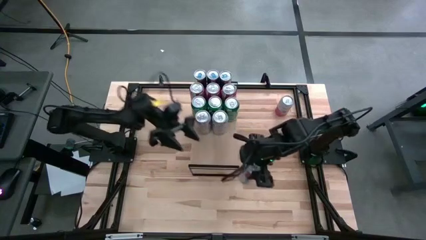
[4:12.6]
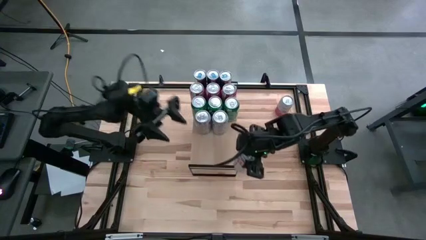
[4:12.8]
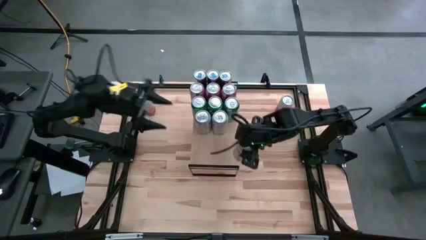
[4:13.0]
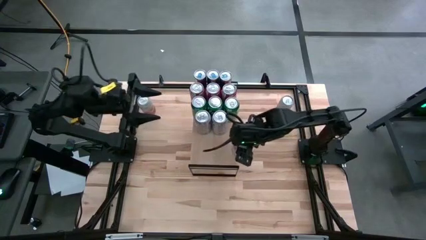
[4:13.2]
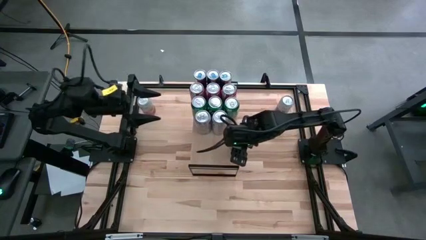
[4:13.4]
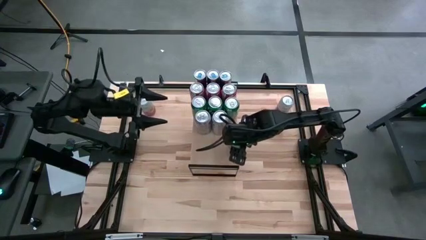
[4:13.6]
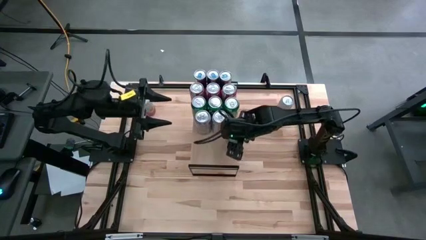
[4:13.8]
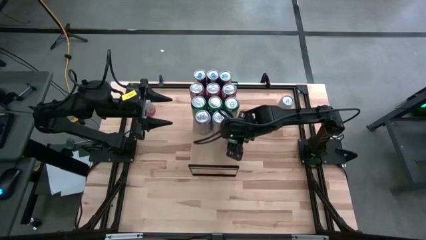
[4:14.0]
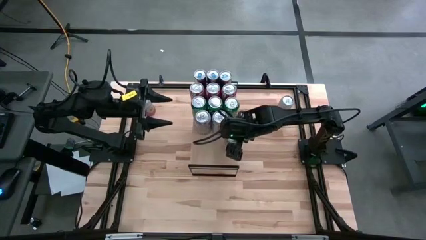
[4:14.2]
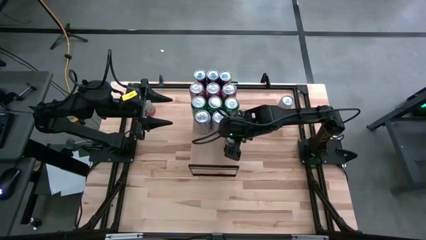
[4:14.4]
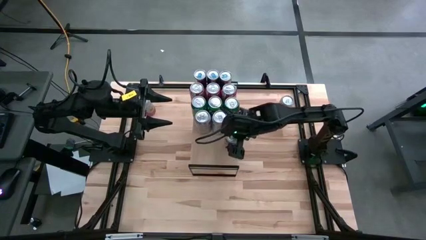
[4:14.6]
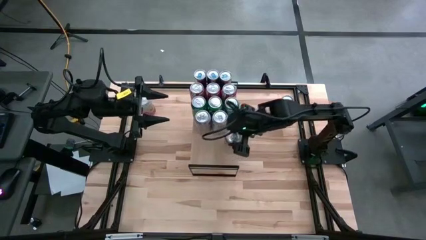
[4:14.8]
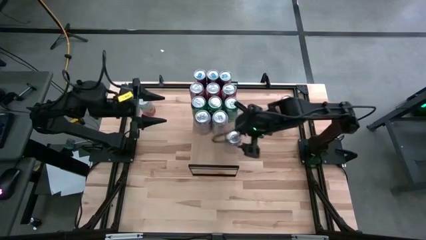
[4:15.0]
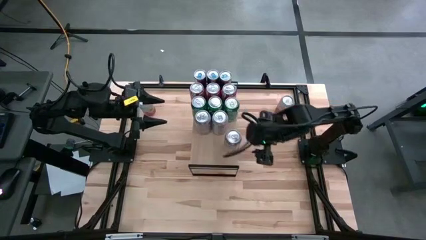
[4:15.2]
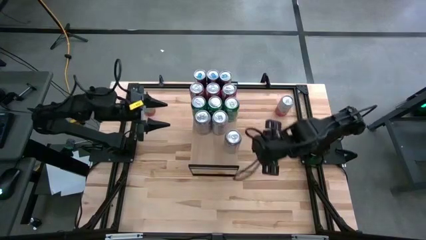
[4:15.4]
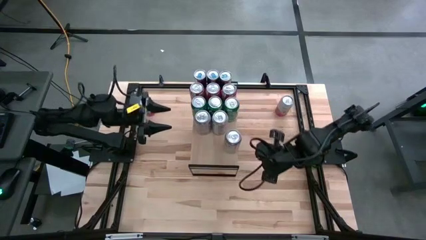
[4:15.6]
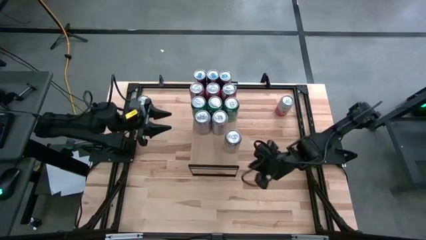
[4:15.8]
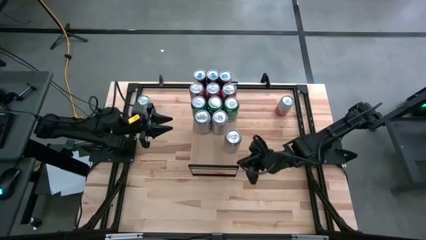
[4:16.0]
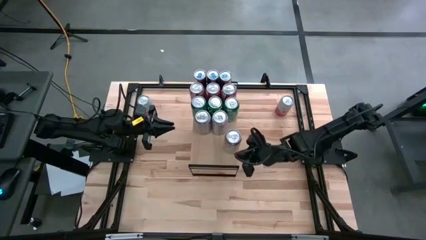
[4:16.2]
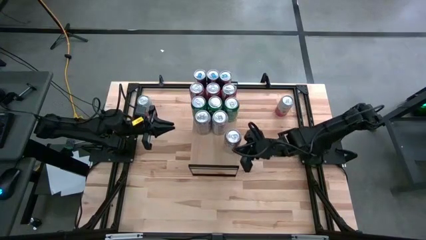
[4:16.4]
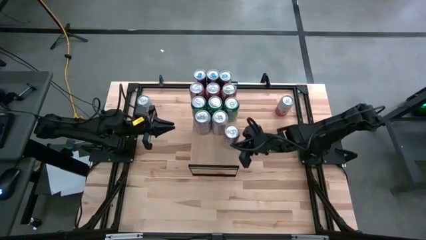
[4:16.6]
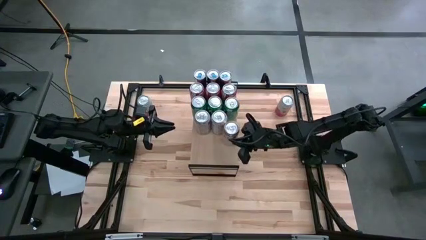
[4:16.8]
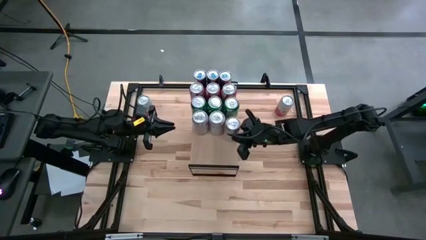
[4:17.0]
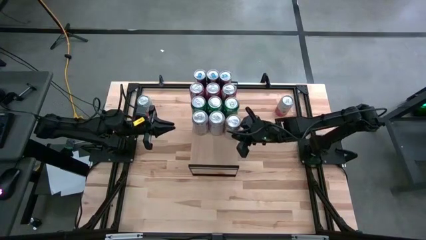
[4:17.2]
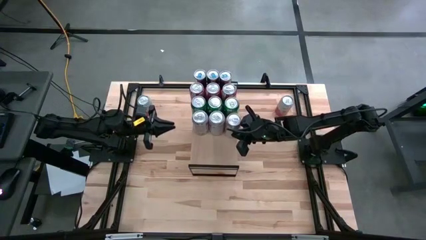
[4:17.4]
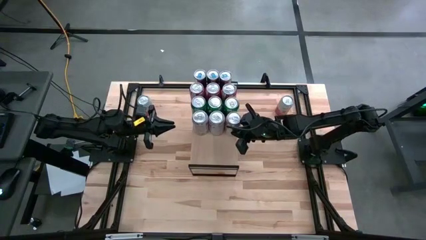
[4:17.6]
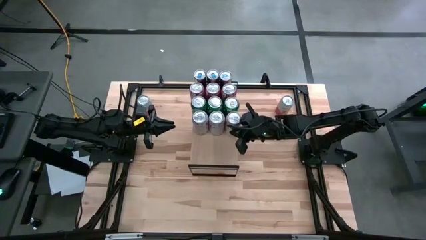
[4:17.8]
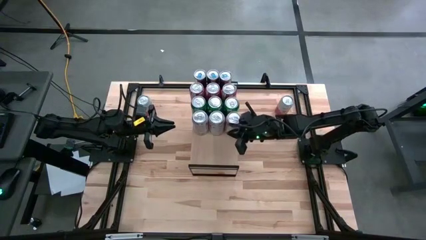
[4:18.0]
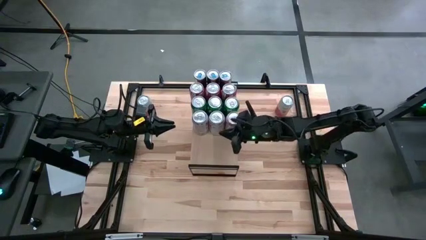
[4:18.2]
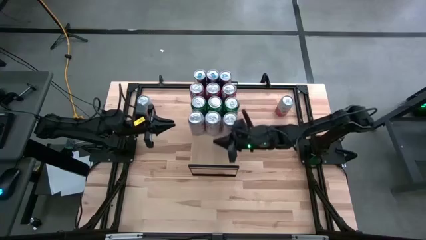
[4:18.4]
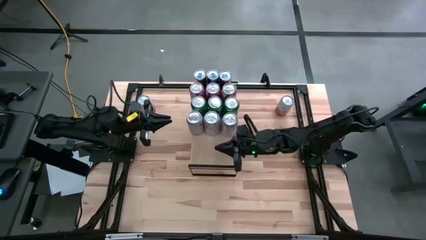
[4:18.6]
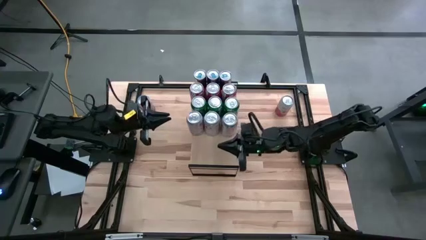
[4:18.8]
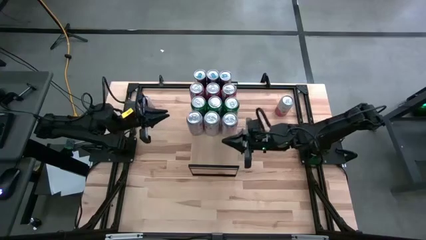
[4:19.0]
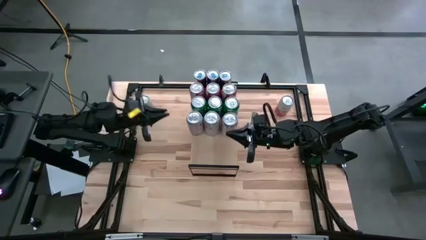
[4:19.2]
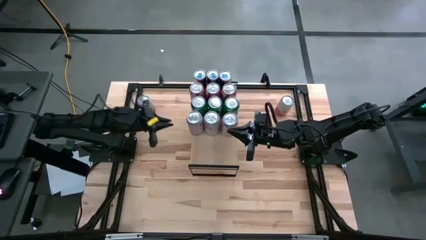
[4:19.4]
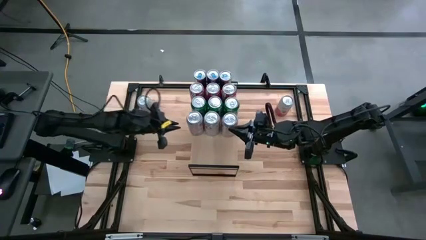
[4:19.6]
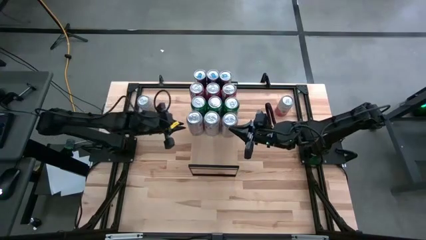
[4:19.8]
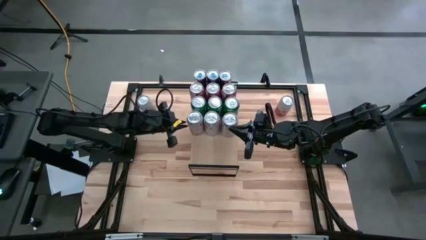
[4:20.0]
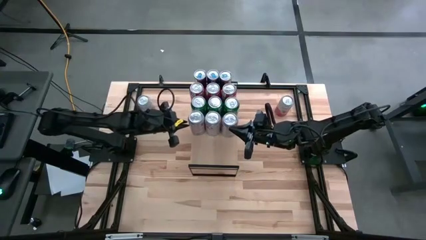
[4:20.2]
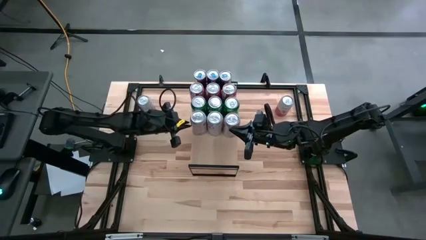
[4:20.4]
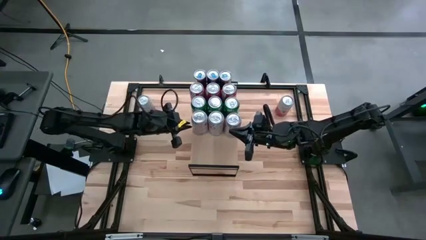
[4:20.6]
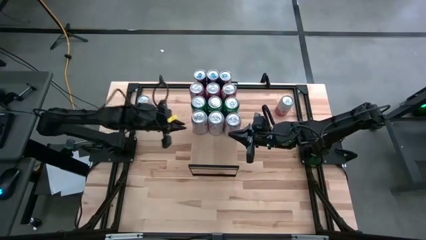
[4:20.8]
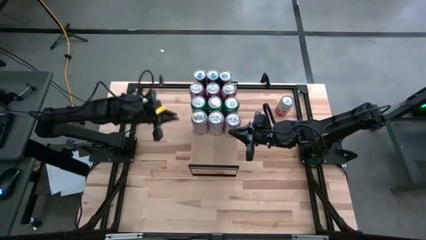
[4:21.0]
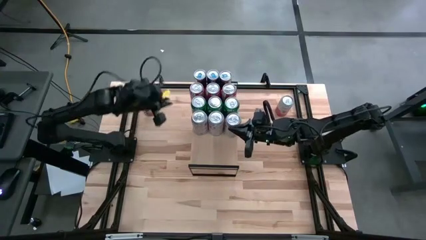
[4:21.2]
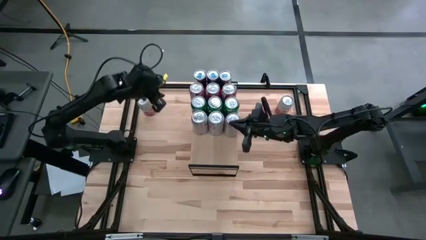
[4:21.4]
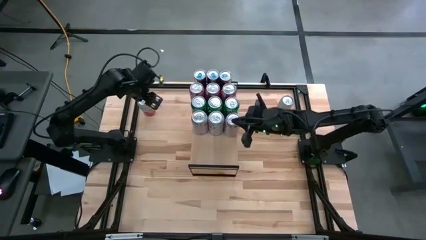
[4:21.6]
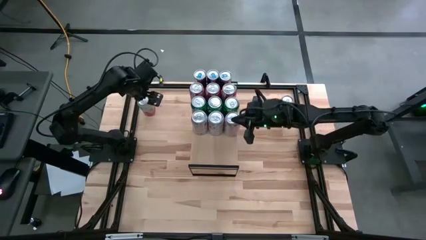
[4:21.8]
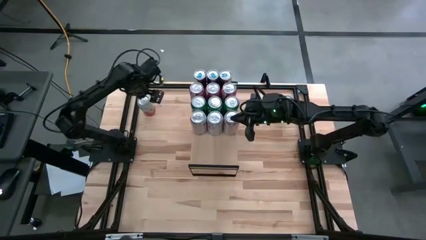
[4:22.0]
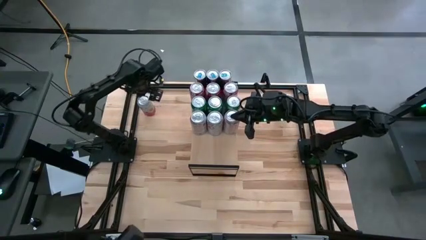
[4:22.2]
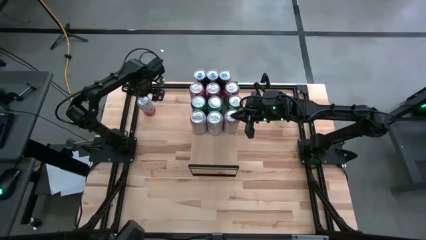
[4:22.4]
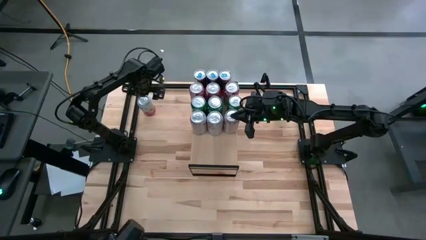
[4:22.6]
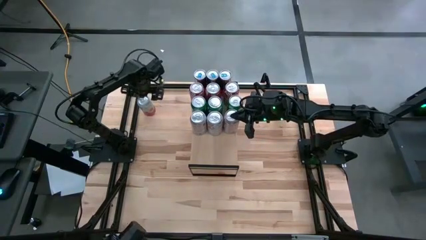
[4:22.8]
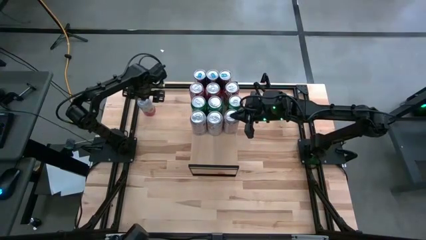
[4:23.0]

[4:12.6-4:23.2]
Task: Place canned beverage on shelf
Put the red silver soda can on the shelf

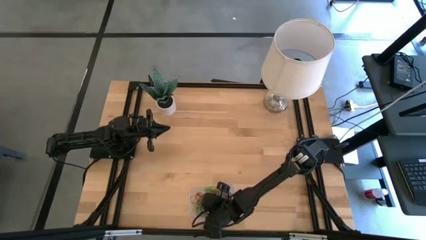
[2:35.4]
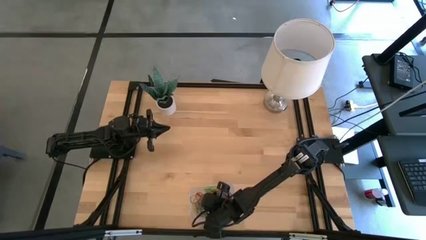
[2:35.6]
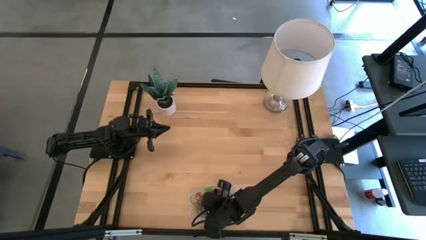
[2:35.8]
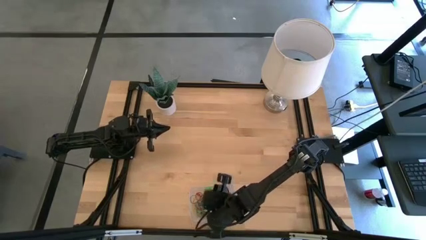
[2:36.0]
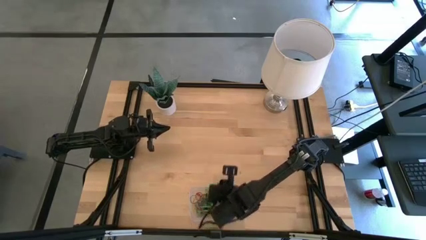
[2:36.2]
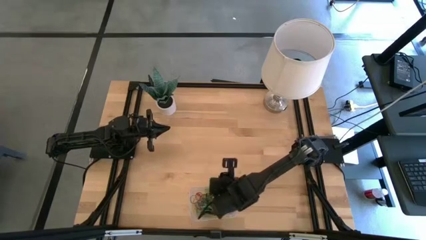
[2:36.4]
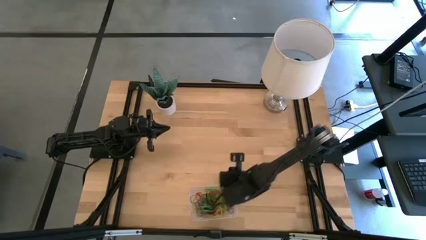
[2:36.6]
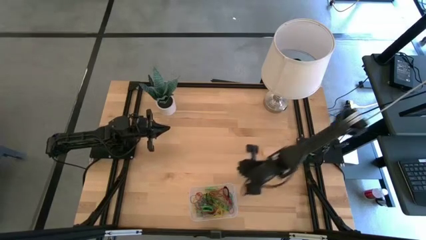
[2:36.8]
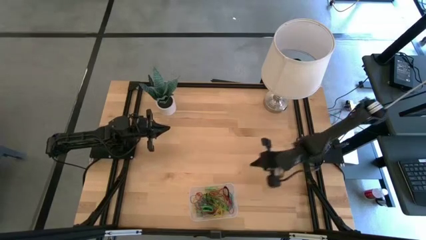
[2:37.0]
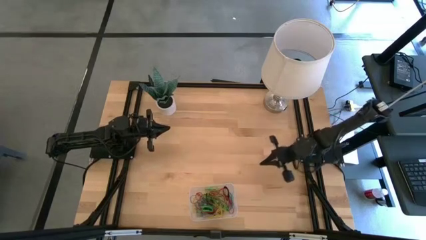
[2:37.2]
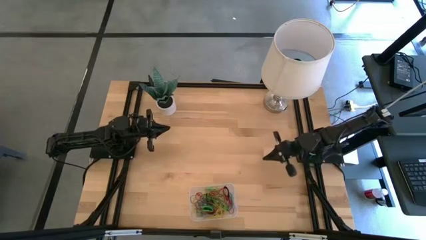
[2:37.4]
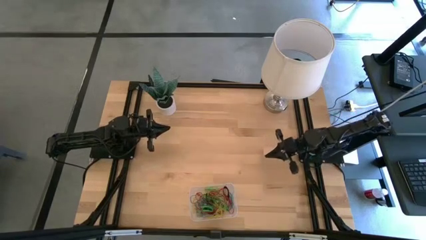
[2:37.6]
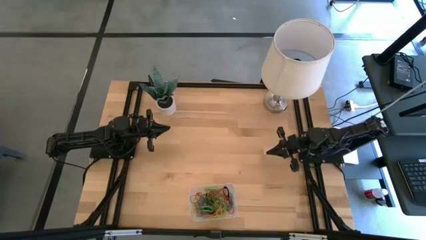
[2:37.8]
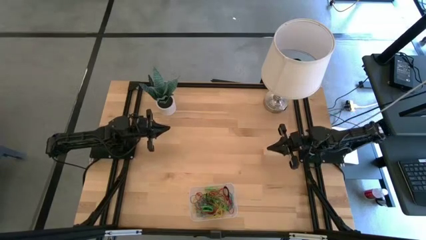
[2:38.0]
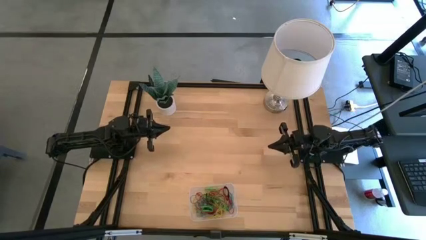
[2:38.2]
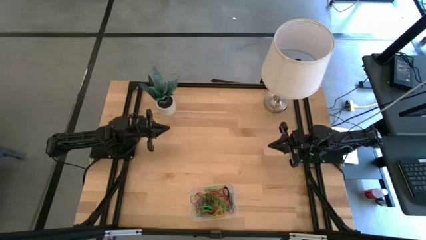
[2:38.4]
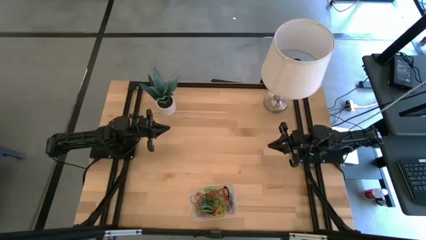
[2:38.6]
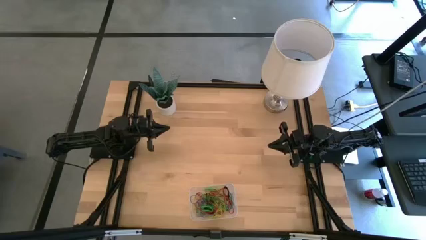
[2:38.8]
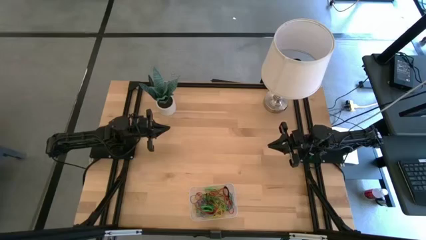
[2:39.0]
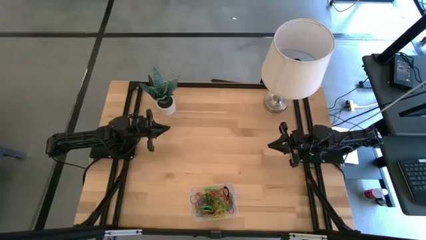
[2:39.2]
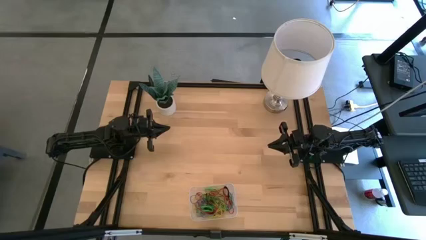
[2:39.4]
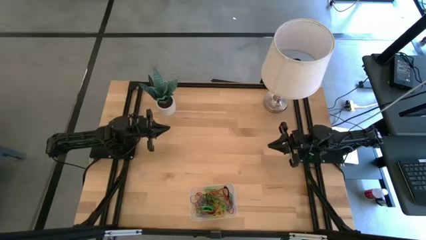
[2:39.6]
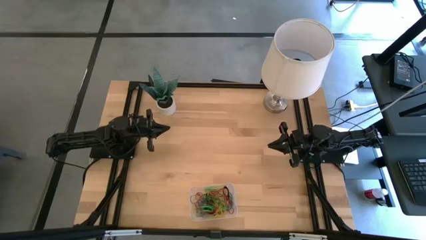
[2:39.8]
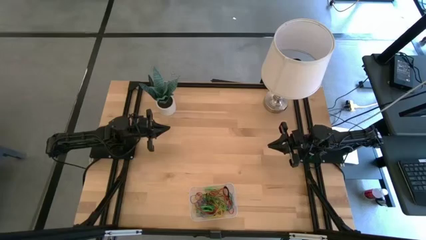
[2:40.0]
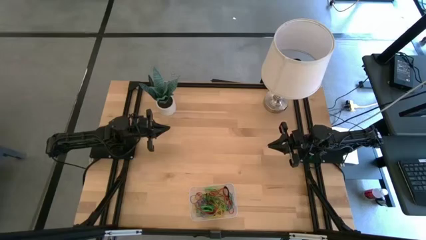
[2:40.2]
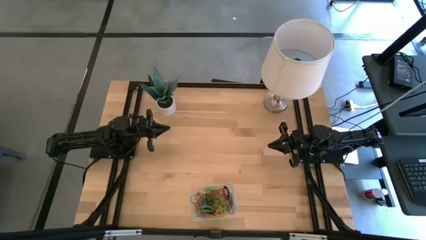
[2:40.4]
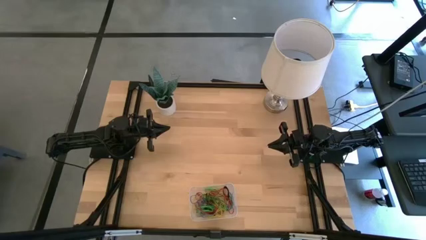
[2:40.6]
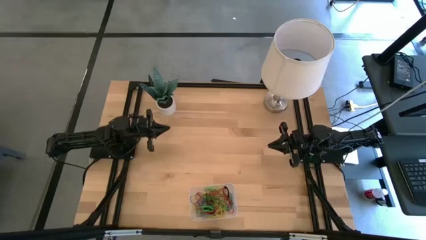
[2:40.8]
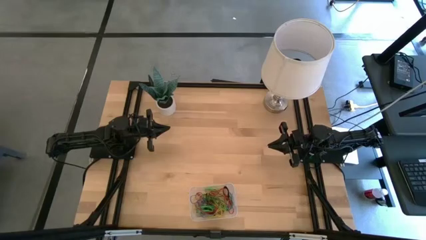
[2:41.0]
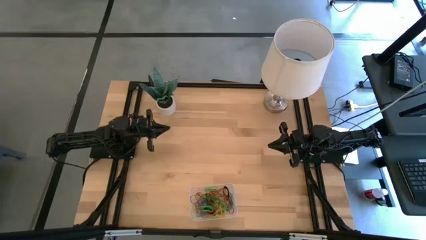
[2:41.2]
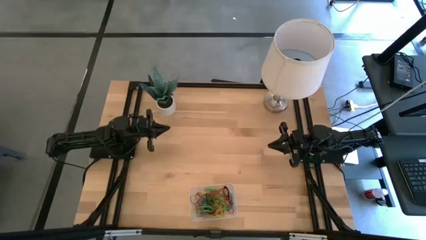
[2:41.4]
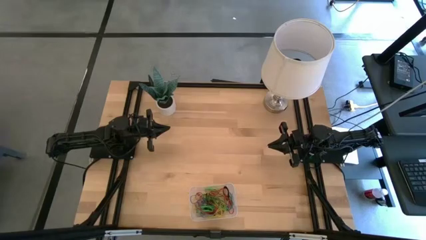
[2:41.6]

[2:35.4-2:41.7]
Task: Pick and place rubber bands into bin
Return to Home Position
